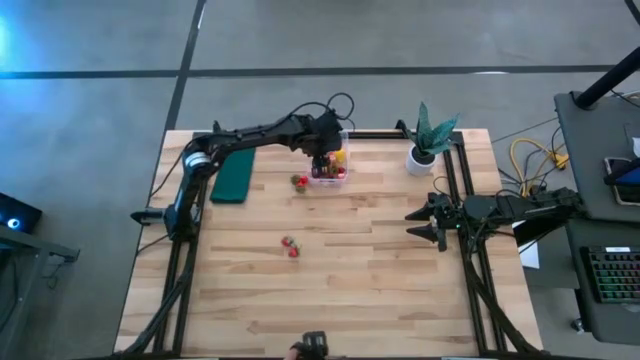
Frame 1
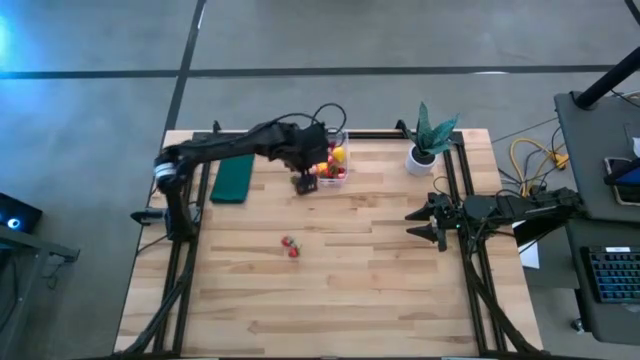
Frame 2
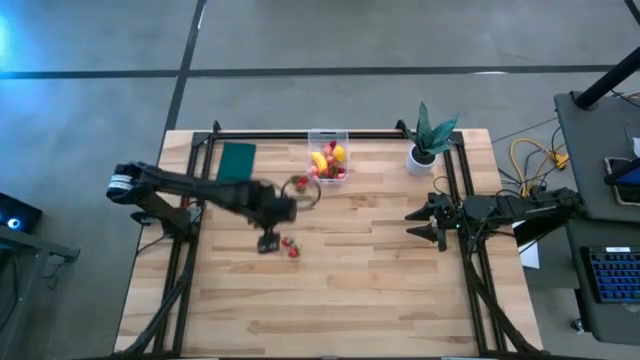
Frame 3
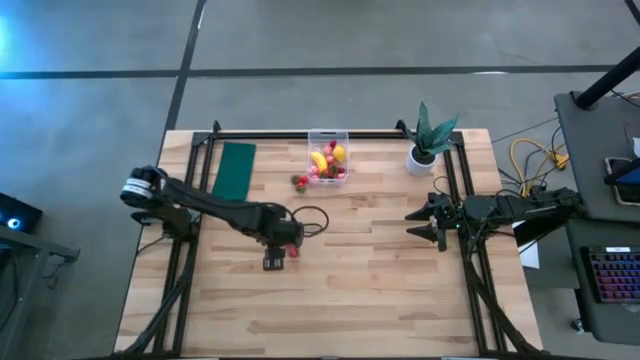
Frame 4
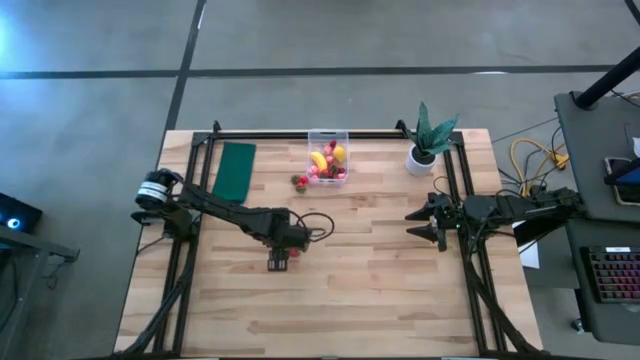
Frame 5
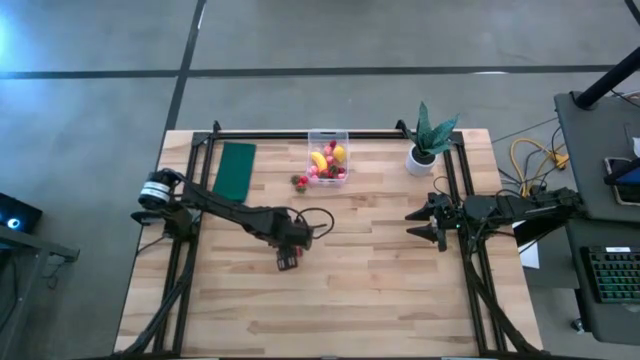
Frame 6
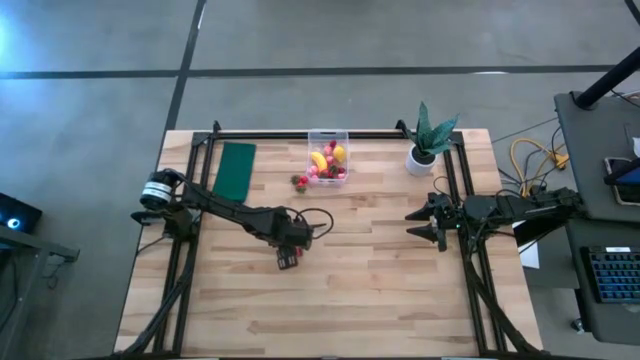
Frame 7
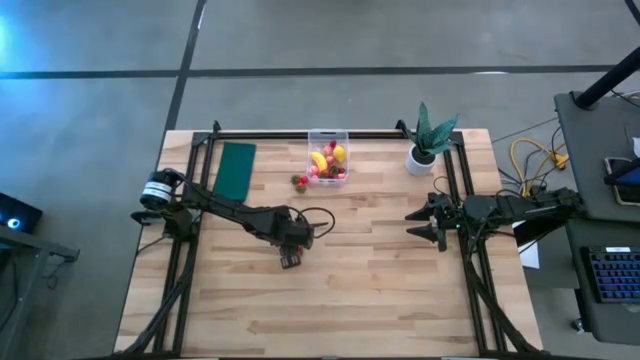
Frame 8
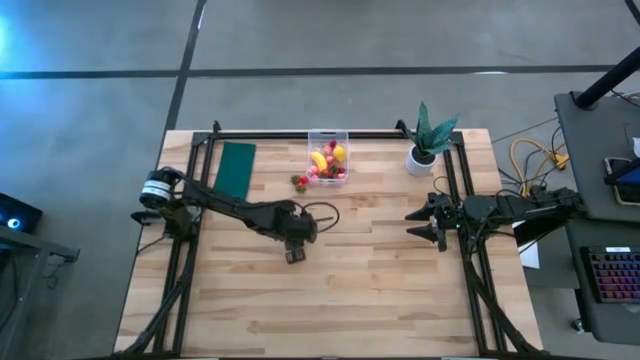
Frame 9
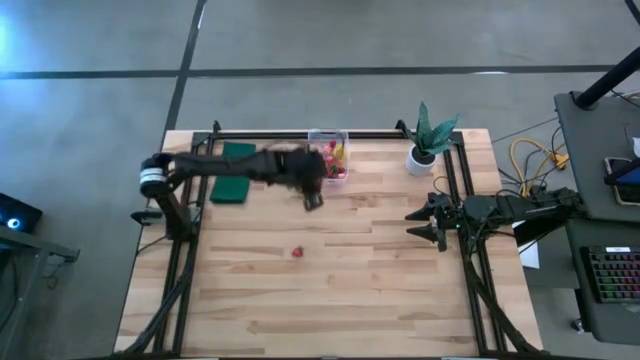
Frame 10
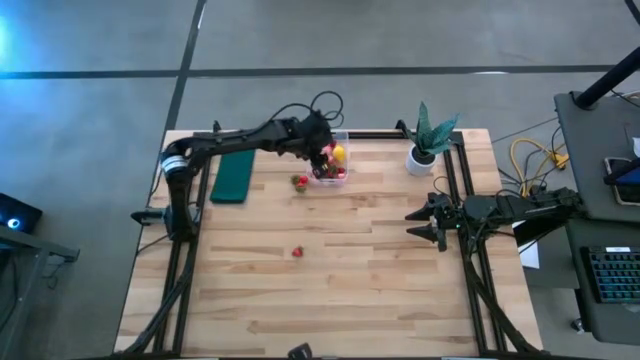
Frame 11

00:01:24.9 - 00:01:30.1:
Task: Pick and placing Produce into tupperware
Put the red strawberry into the transparent bin

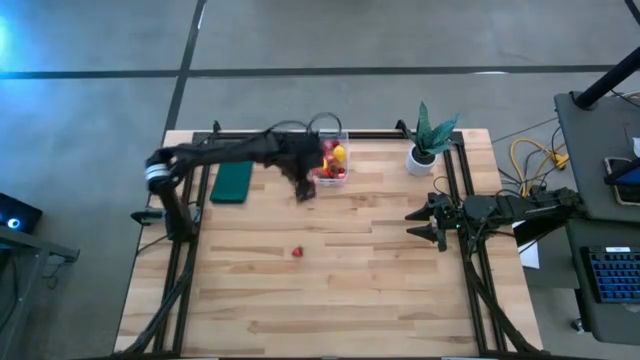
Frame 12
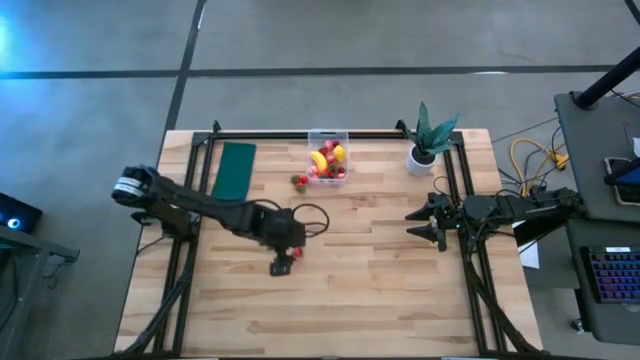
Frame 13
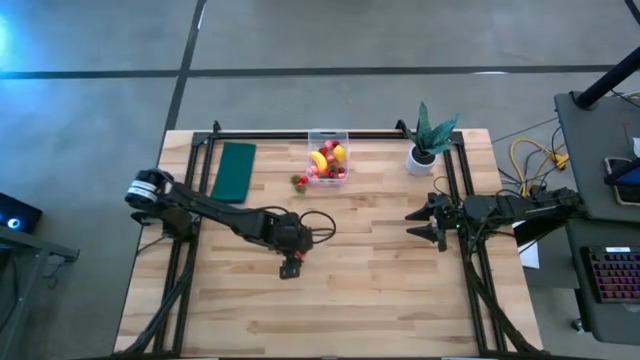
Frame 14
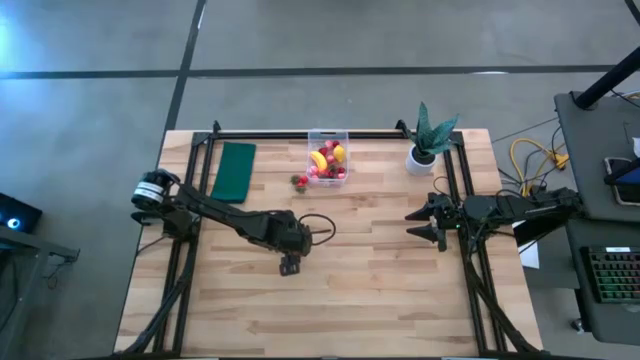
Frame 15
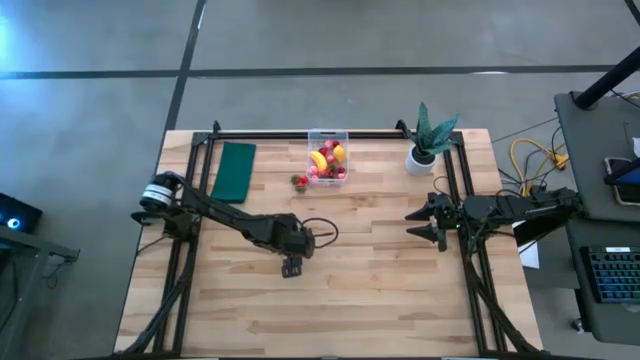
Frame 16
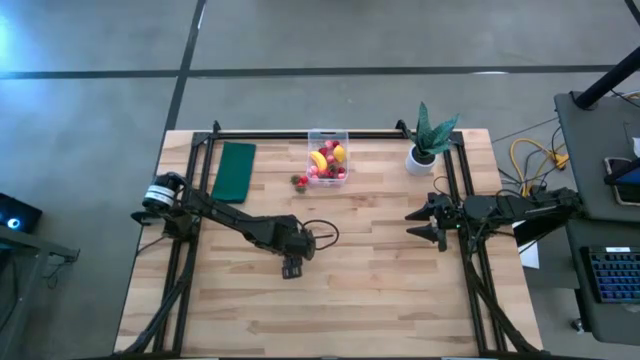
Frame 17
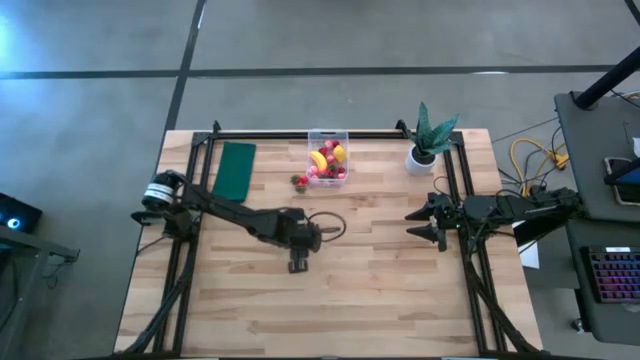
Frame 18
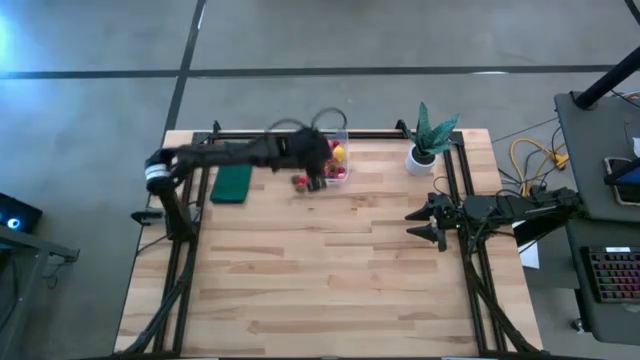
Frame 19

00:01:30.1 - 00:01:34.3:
Put the red strawberry into the transparent bin

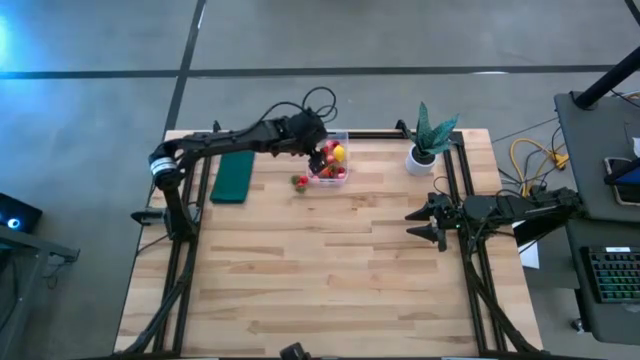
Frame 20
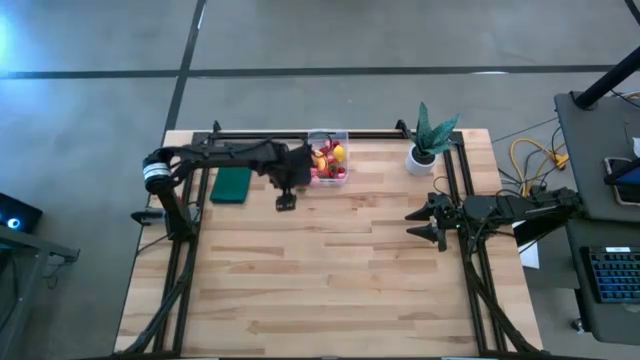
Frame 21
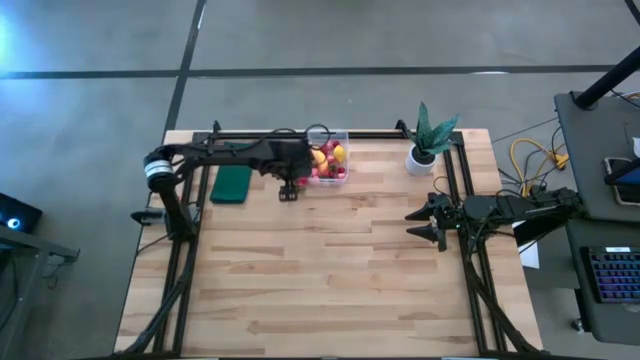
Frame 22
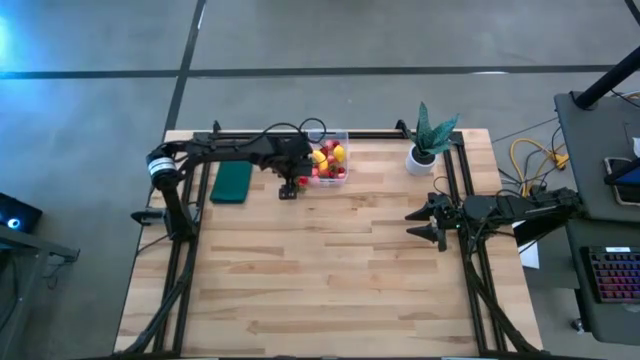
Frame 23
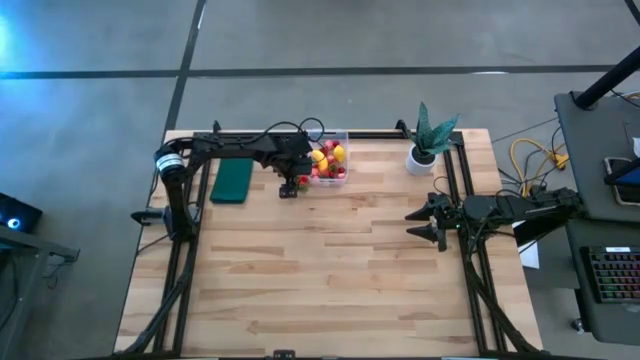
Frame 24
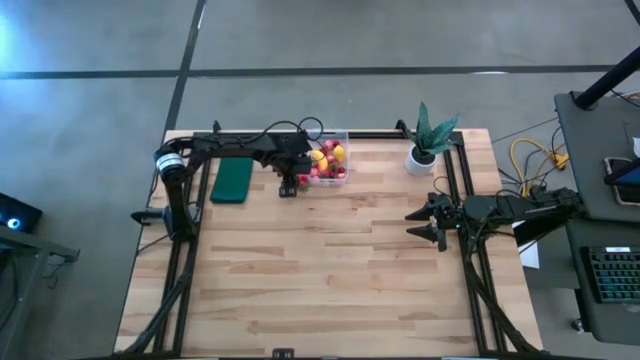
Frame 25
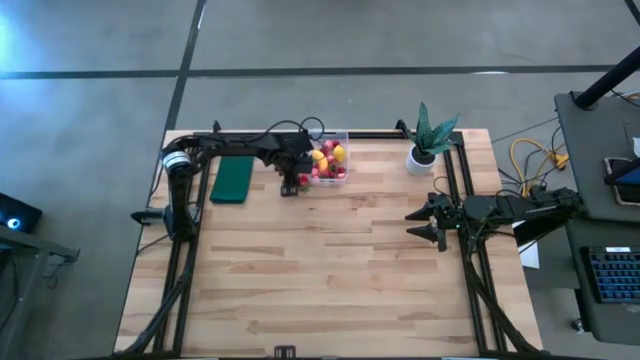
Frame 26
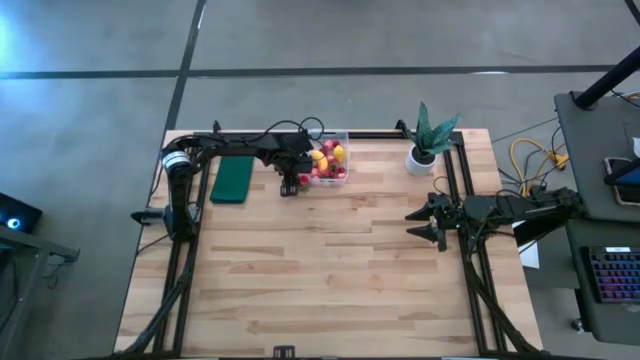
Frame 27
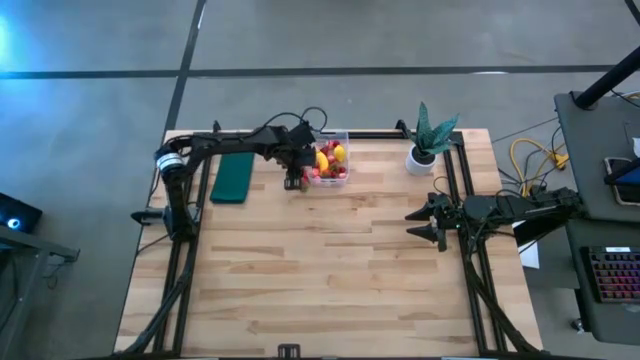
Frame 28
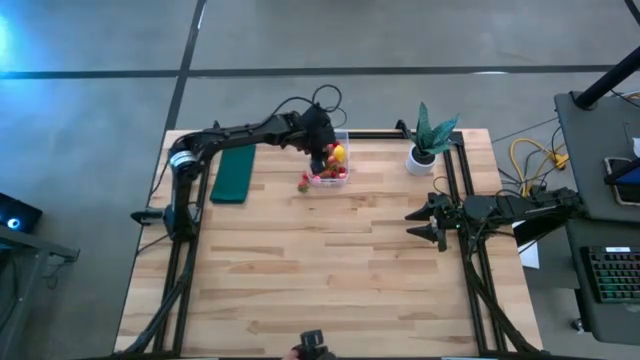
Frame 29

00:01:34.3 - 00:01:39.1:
Put the red strawberry into the transparent bin

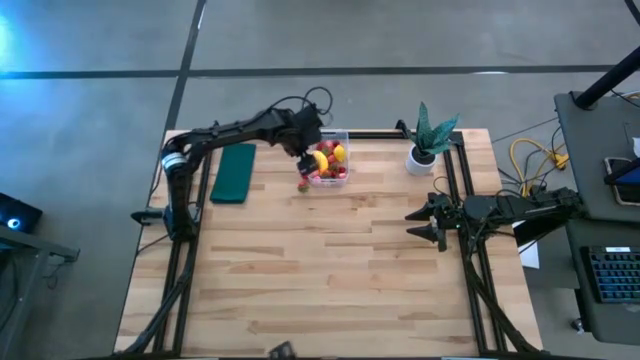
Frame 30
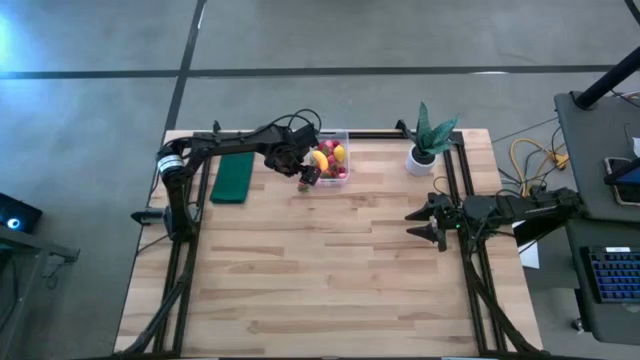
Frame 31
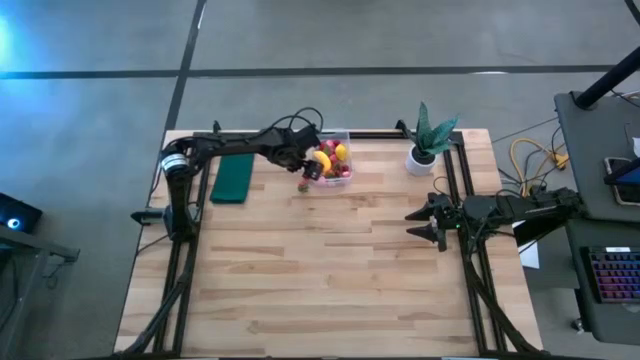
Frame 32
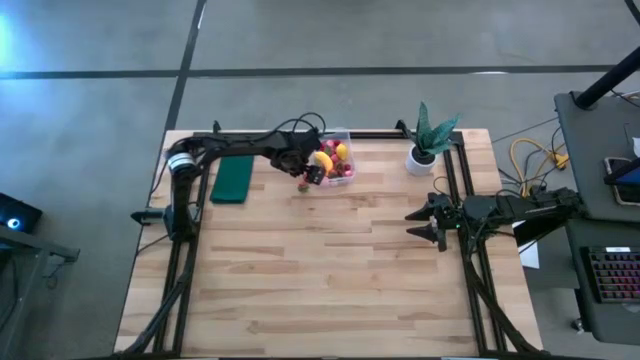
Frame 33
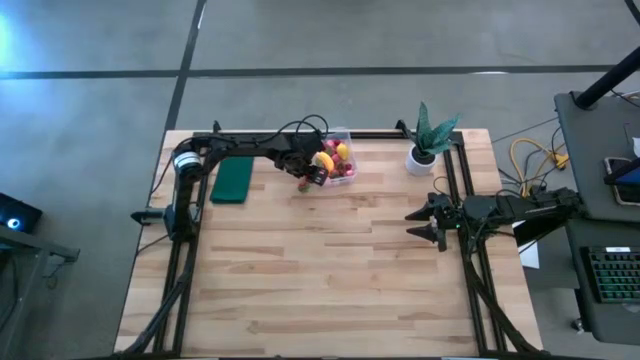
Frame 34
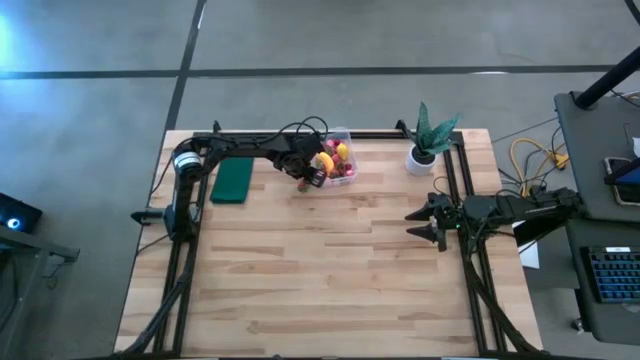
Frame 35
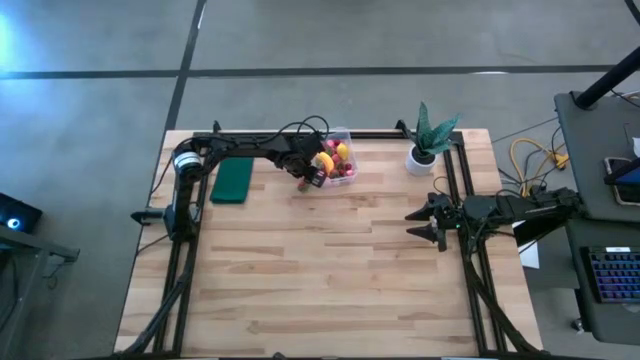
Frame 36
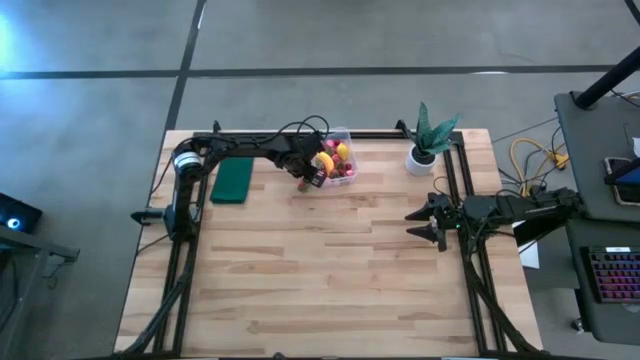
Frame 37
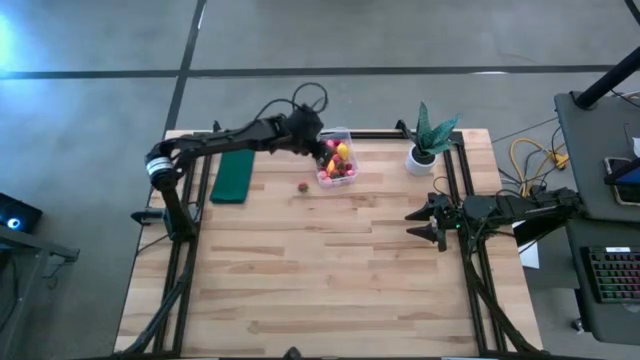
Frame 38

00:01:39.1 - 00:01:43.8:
Put the red cherry into the transparent bin

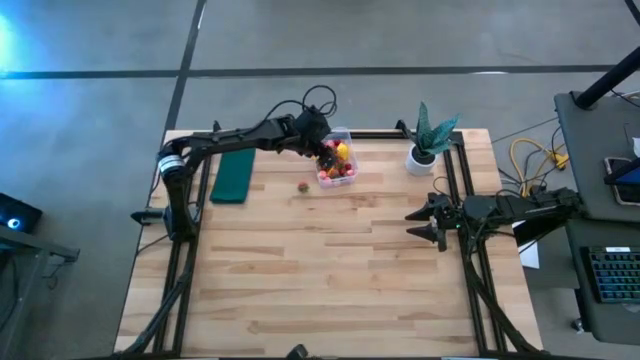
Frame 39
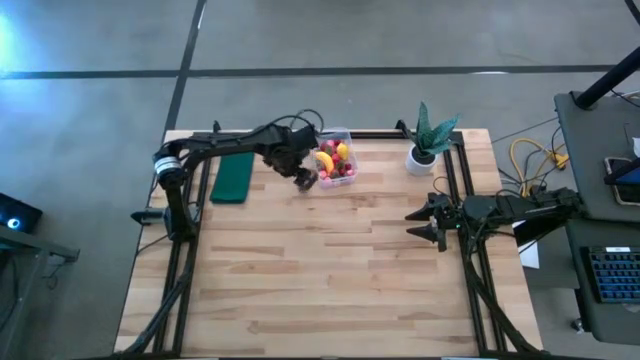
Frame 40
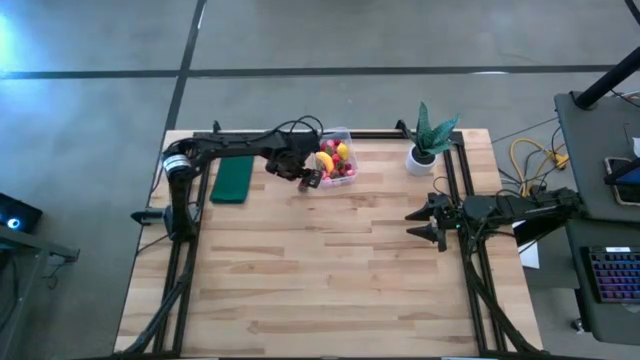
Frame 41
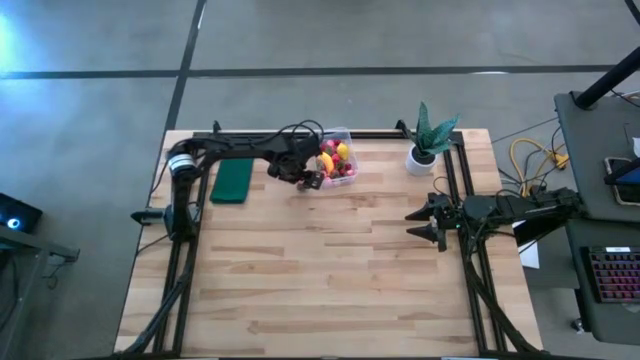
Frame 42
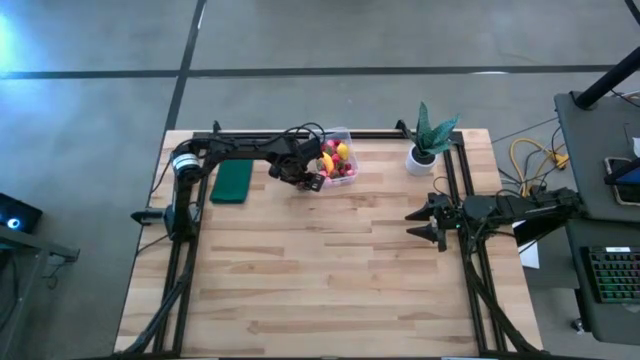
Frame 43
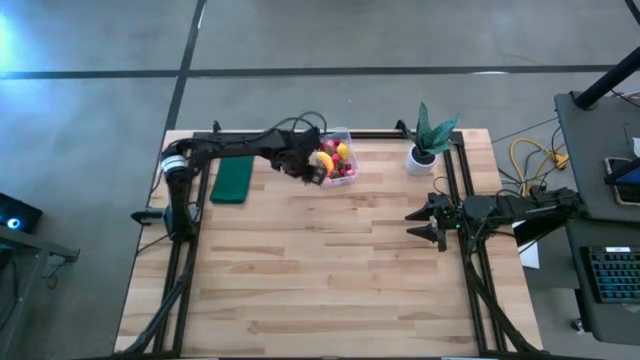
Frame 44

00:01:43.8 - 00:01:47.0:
Put the red strawberry into the transparent bin
